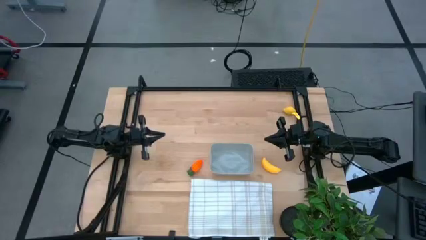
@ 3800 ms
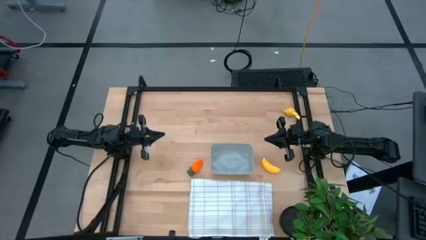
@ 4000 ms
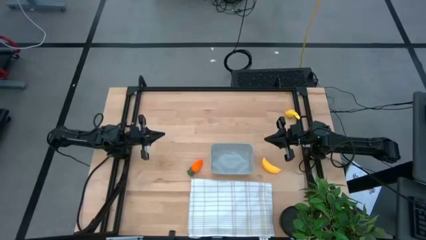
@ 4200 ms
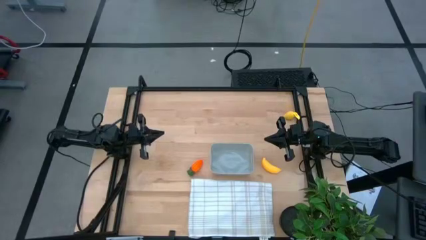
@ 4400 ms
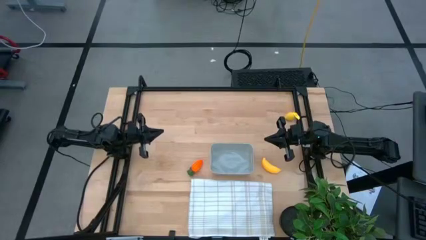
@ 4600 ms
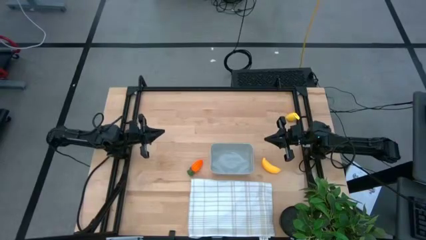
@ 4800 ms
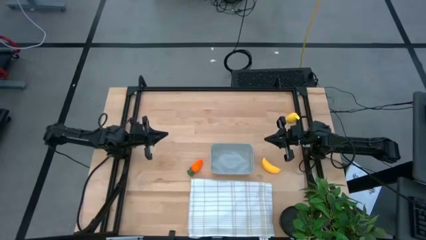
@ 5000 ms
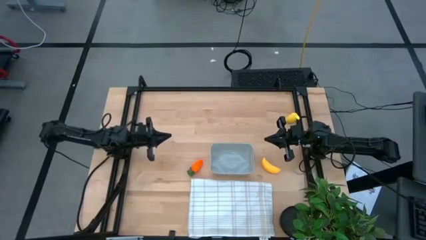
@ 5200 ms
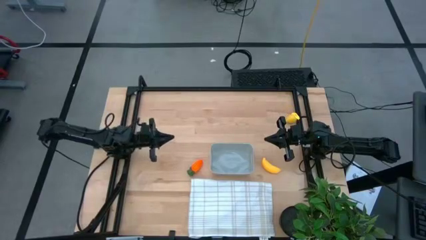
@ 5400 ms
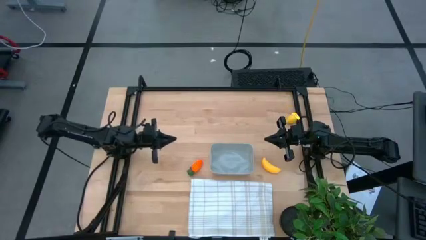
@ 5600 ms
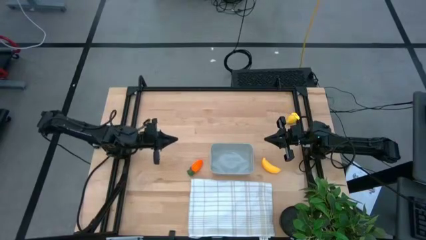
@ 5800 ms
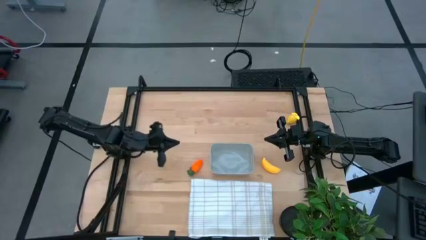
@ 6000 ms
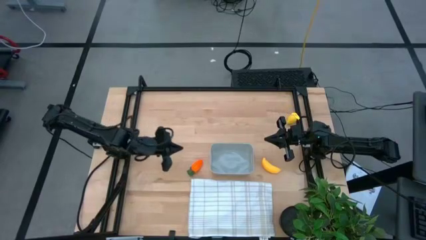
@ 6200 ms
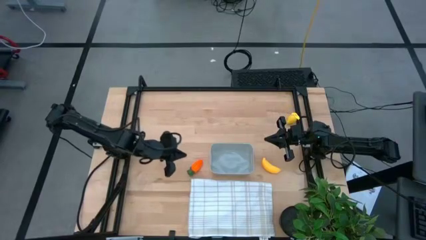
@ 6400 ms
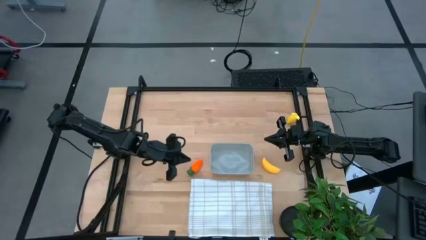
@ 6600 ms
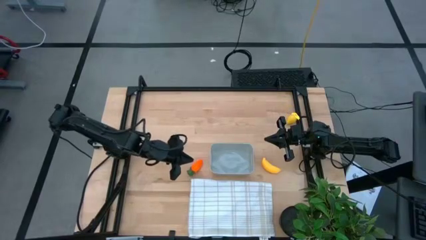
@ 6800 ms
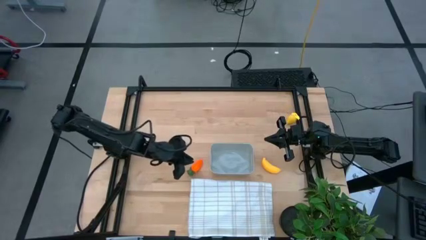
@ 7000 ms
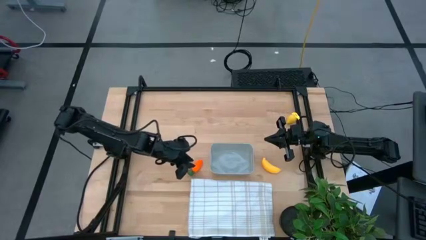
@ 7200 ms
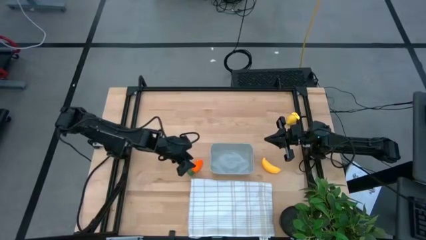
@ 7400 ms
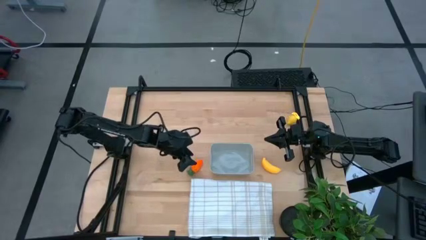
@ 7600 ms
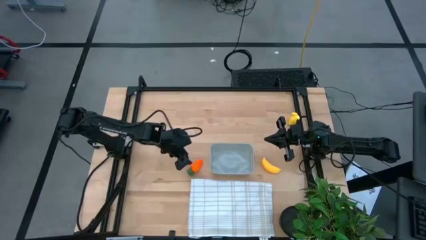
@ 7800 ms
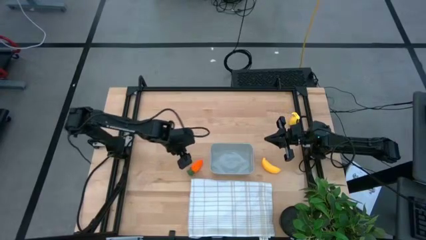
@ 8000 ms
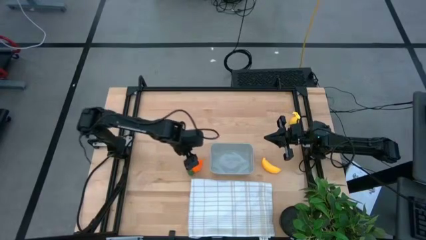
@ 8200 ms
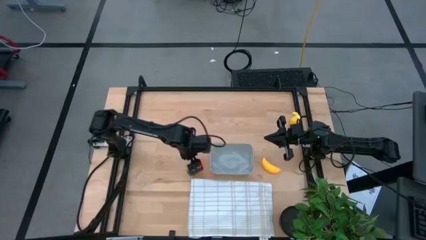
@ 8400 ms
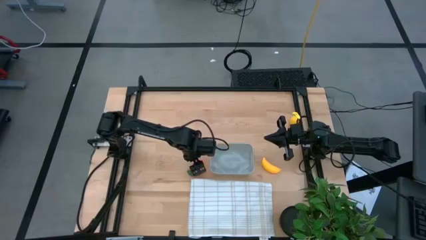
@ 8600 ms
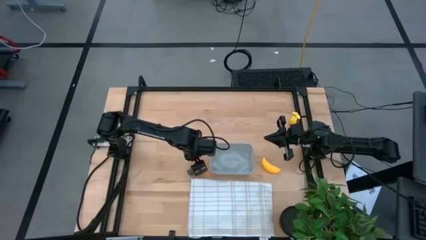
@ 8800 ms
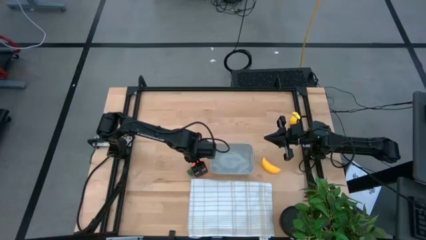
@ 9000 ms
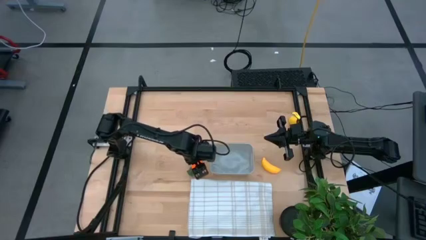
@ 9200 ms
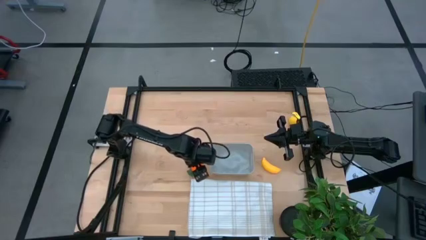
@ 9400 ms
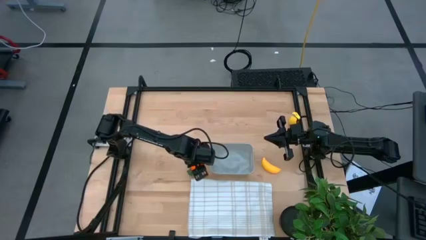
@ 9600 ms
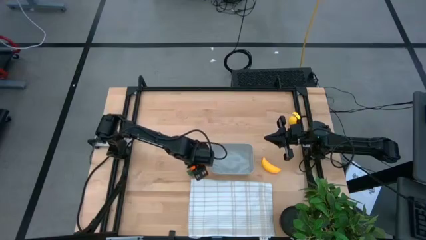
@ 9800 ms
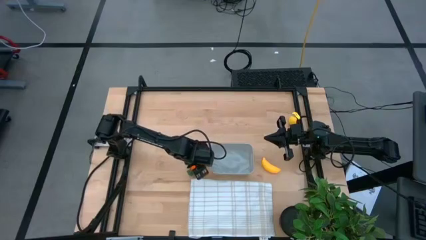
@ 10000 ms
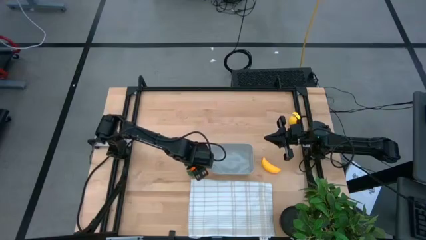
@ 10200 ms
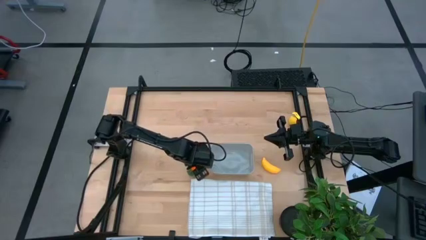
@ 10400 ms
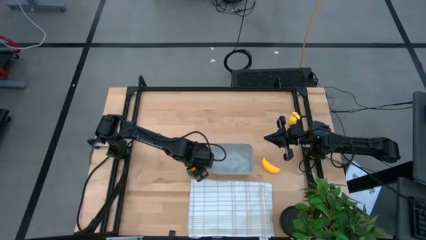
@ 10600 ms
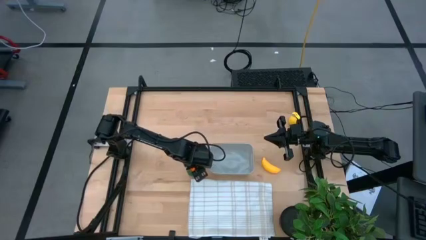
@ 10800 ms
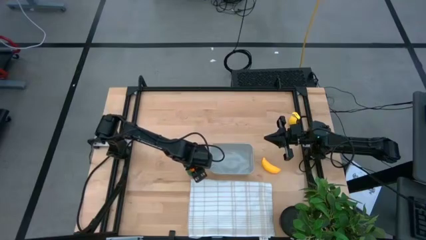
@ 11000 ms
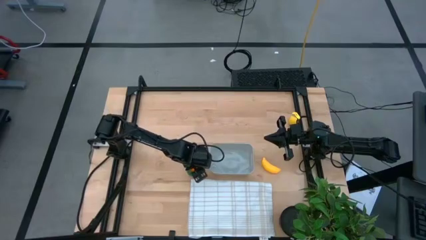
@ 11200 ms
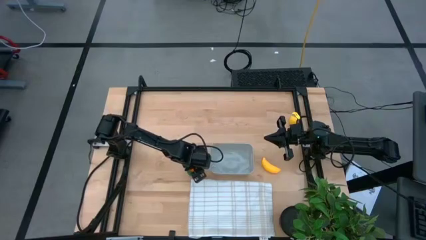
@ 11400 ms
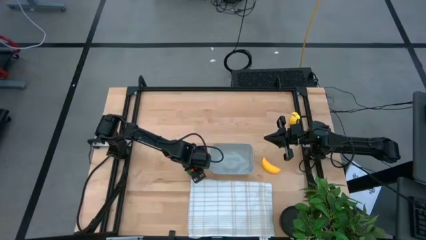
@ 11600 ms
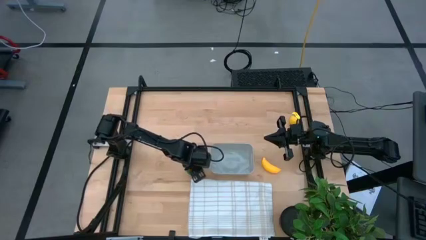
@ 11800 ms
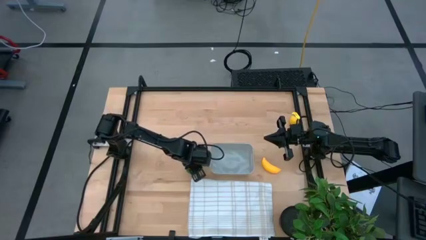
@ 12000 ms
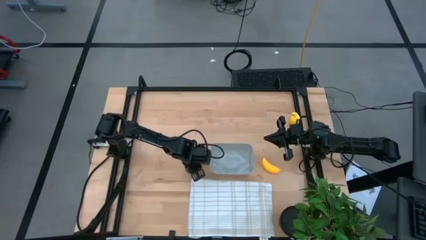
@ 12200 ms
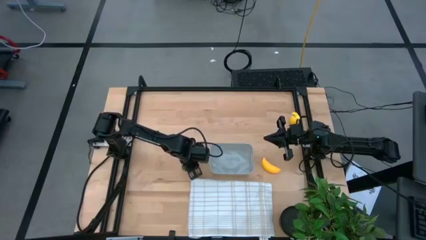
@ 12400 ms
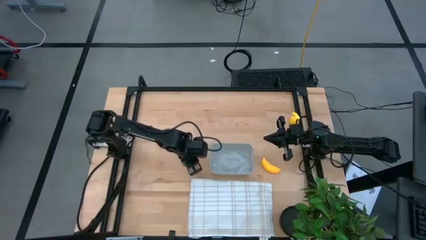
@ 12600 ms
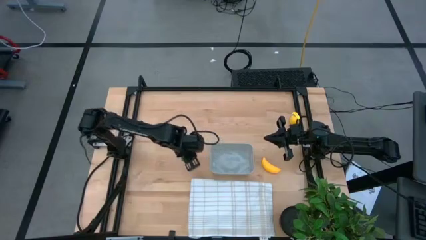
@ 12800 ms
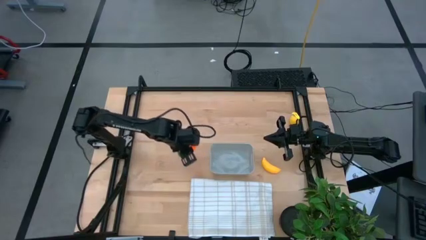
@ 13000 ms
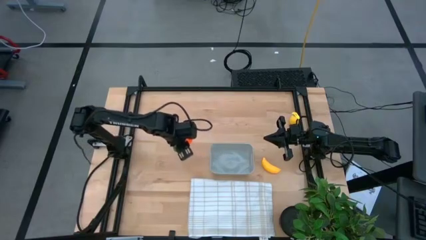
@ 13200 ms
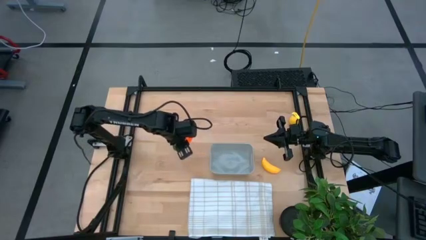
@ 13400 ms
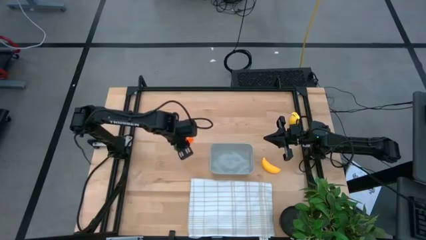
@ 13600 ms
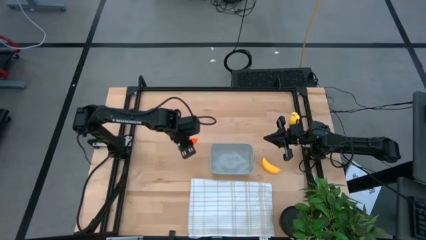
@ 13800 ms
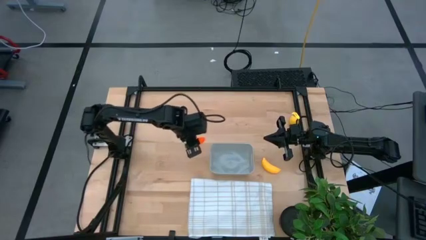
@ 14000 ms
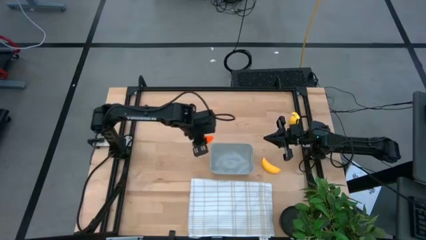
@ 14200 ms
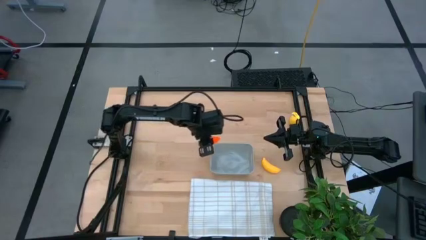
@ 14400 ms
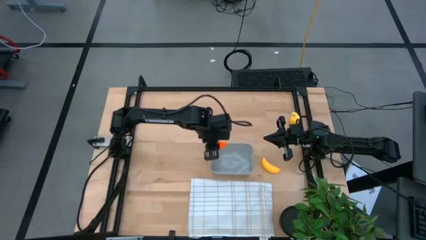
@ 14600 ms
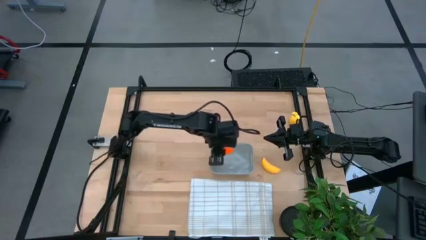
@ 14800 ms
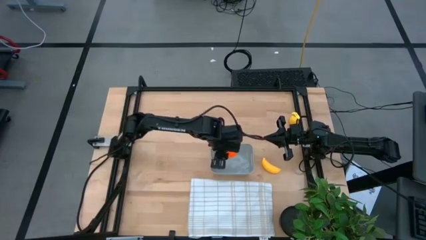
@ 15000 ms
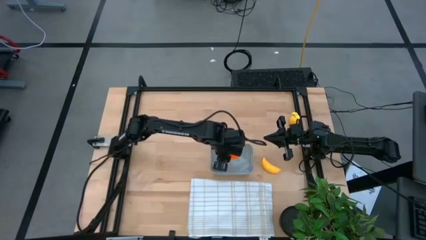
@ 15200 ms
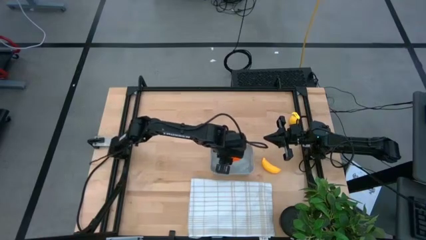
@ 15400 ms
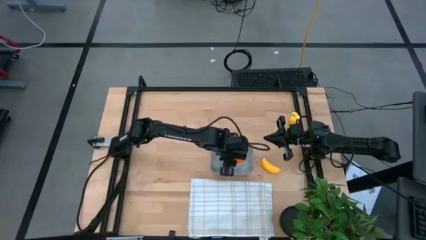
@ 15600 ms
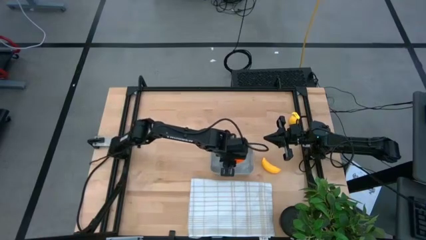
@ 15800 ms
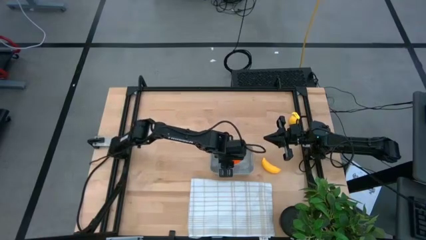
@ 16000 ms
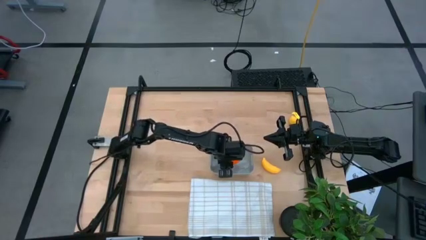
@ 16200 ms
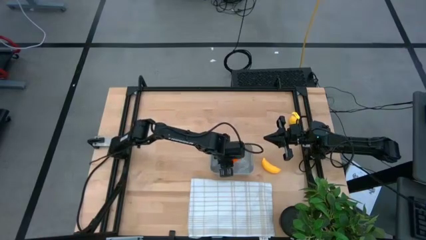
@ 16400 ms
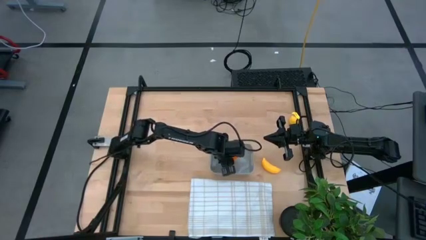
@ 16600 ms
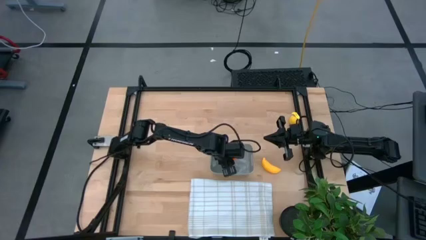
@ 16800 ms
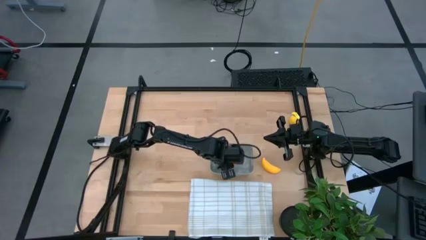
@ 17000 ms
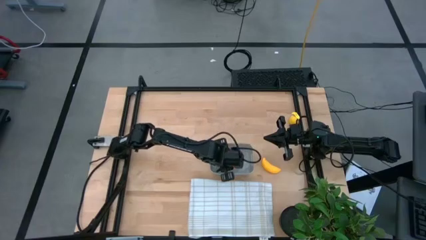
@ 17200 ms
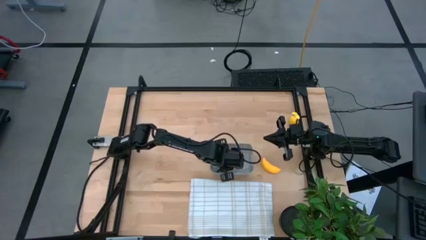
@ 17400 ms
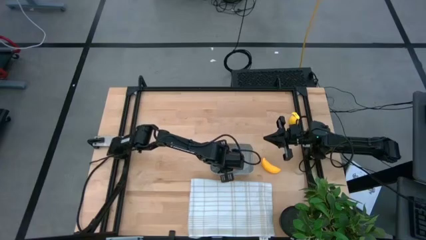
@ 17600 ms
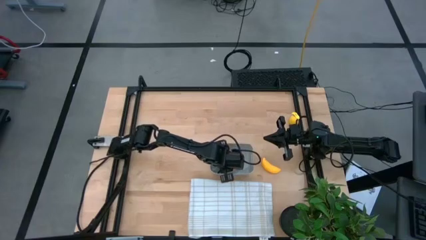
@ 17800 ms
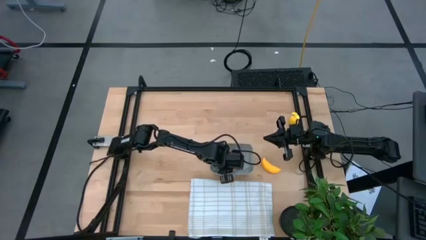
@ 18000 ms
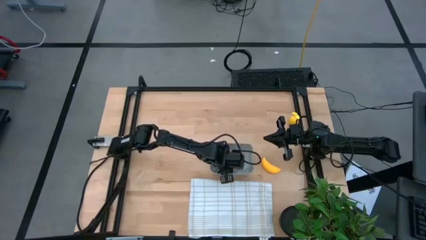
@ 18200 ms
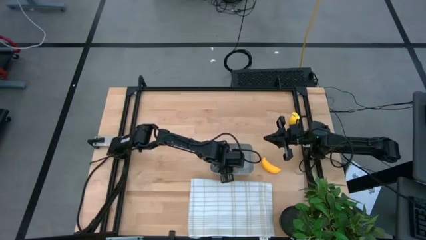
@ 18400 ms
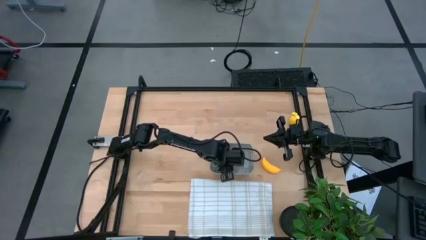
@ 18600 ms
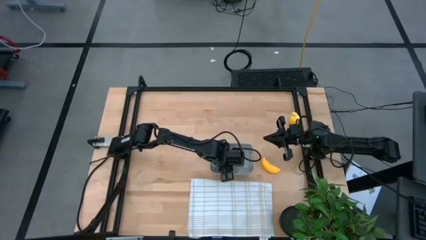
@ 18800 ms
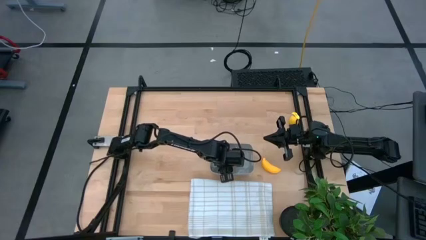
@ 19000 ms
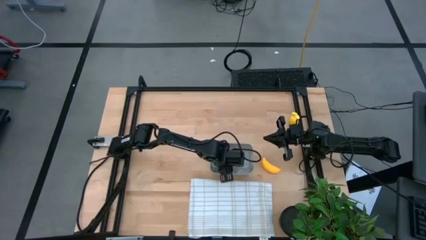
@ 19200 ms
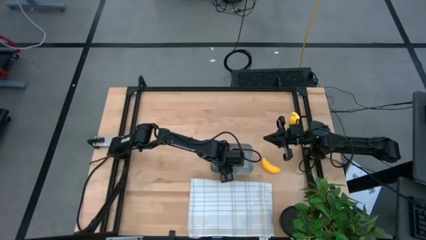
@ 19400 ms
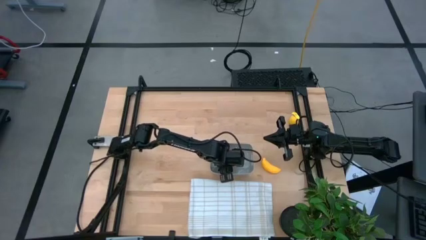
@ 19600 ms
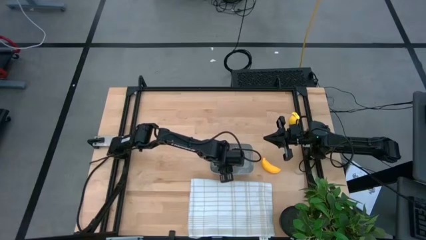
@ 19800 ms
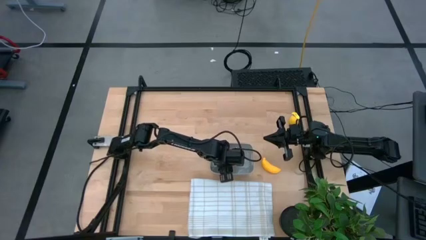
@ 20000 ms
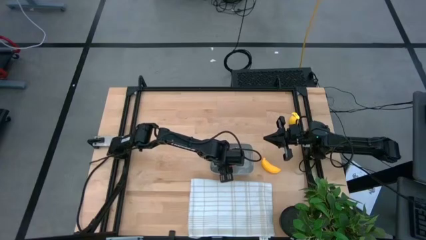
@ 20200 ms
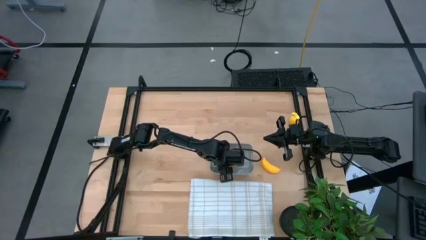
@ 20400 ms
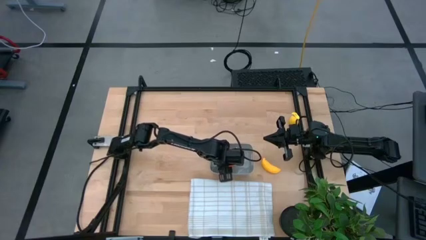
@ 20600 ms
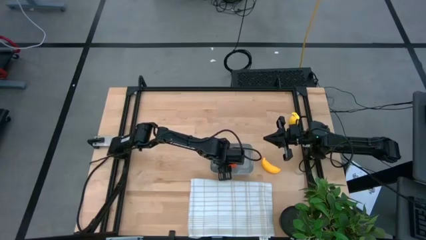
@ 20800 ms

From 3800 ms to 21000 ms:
Task: Pick and placing Produce into tupperware
Put the carrot into the gray bin
